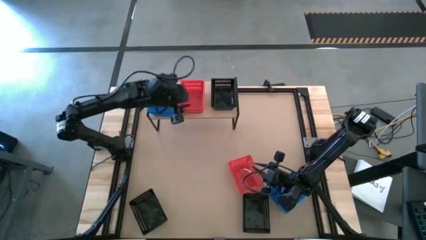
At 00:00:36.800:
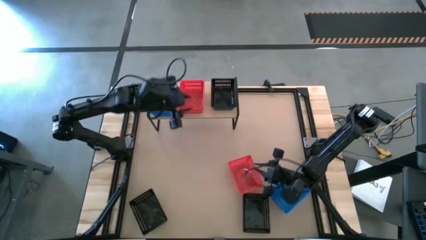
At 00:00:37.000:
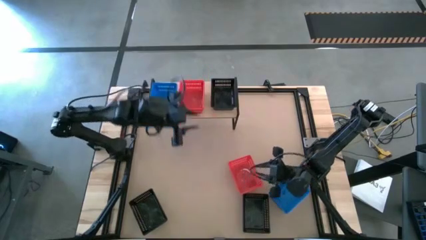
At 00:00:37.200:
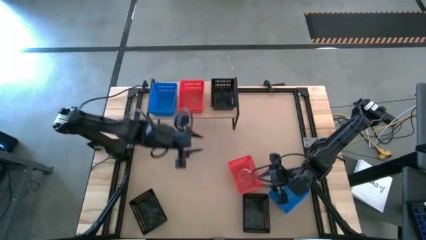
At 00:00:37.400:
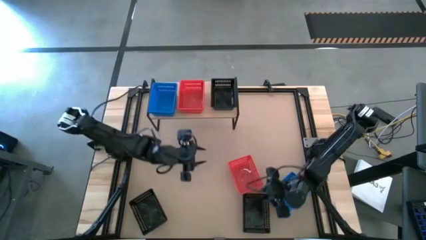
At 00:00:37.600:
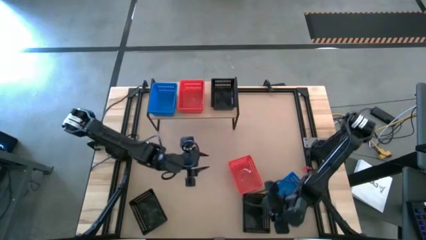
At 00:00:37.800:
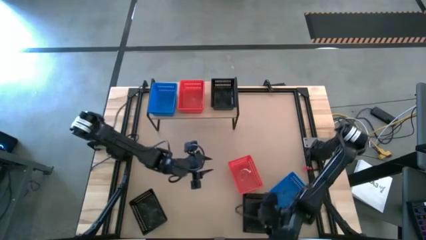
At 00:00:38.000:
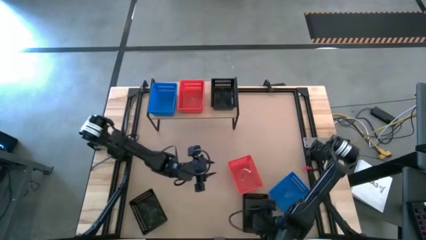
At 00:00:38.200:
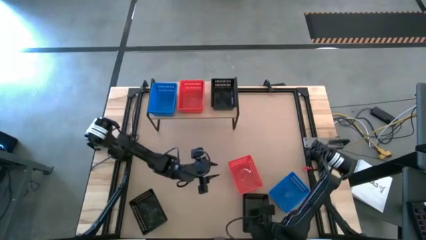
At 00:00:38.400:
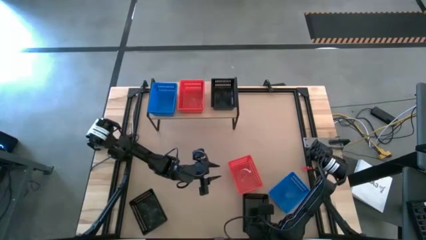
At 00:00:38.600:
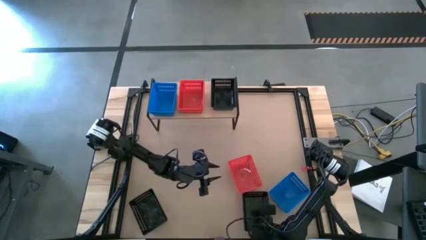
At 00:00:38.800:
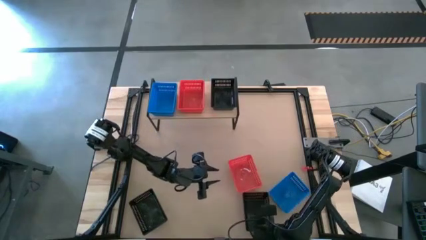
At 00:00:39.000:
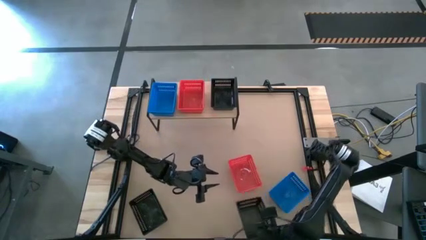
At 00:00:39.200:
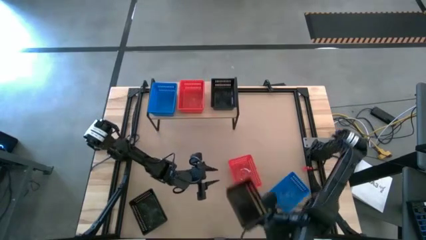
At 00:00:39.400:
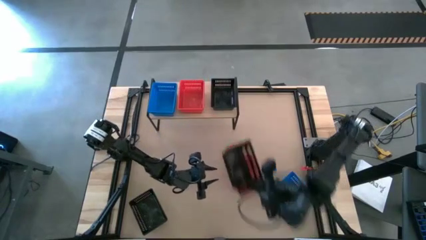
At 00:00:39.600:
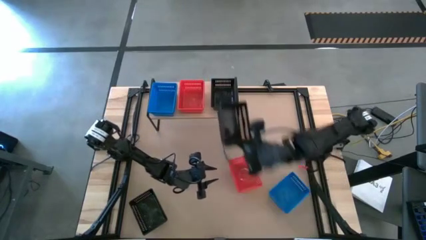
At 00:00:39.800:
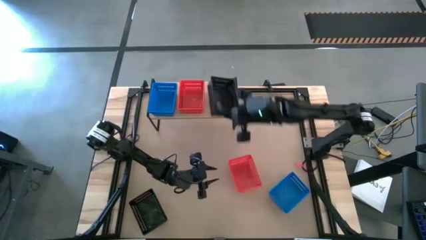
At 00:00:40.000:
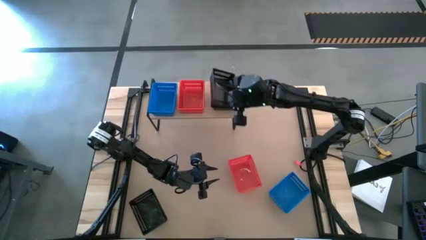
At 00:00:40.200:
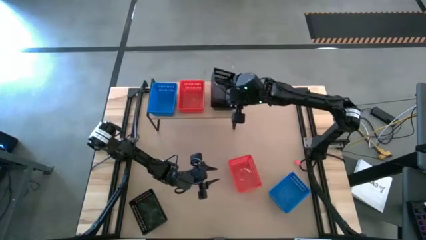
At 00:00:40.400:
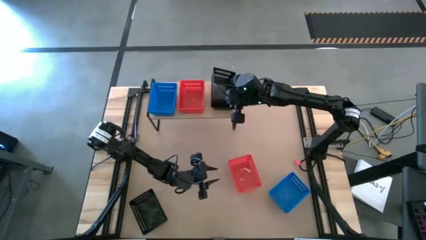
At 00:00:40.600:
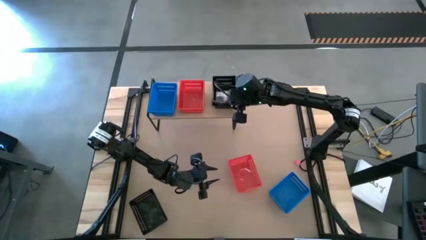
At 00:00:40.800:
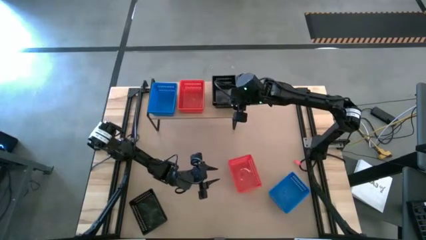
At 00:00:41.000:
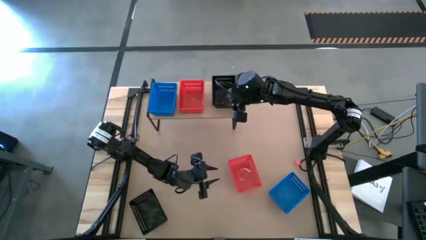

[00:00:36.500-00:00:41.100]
Task: Stack baskets on shelf by color
Stack the right black bin on the black bin on the shelf

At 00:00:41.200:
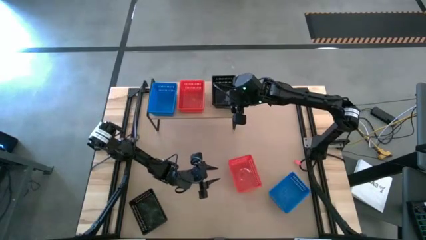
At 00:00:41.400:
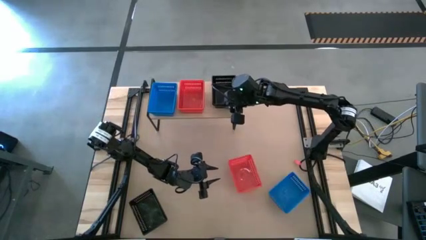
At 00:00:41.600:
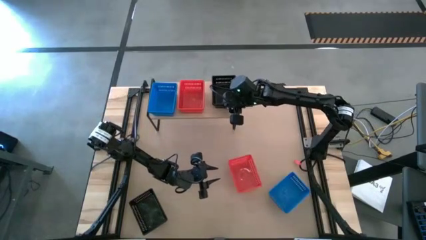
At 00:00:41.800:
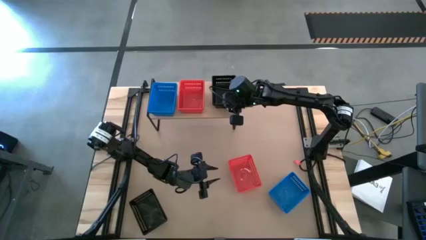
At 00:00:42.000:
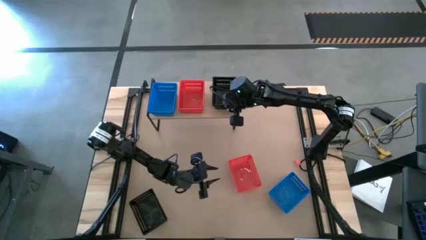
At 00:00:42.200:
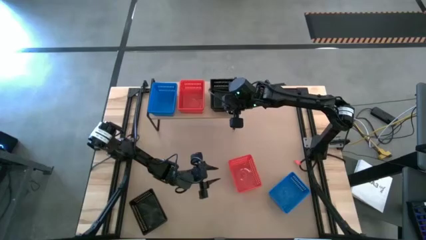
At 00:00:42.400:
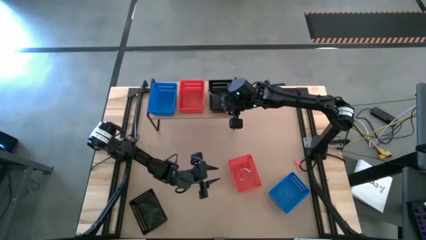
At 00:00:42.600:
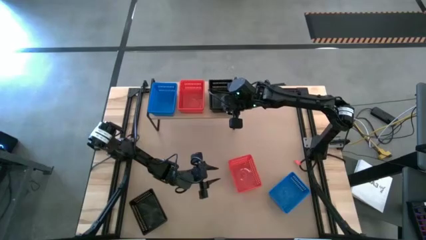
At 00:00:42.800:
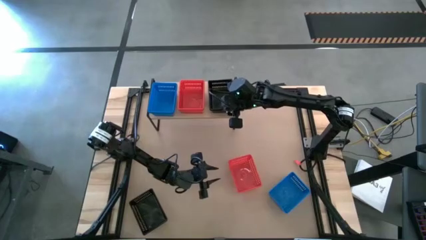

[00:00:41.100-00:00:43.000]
Adjust the black bin on the shelf

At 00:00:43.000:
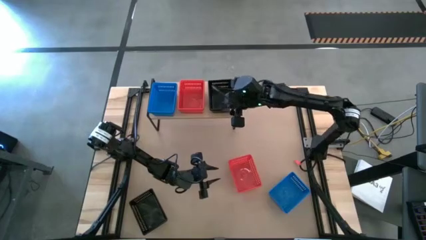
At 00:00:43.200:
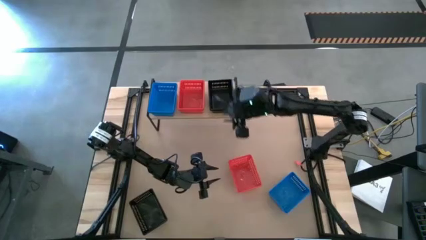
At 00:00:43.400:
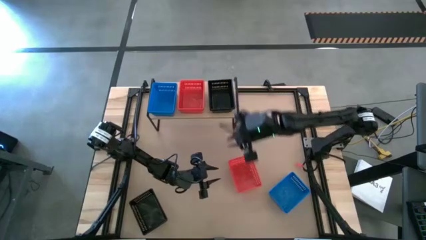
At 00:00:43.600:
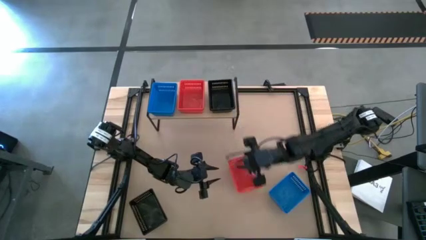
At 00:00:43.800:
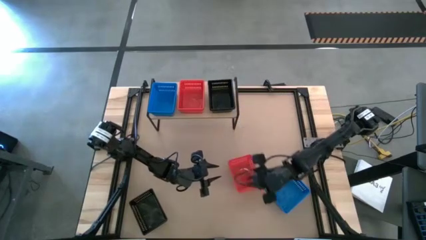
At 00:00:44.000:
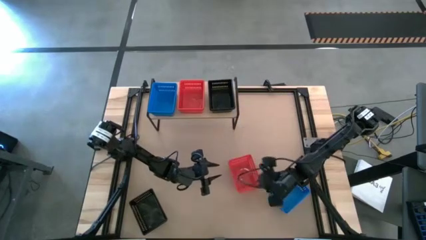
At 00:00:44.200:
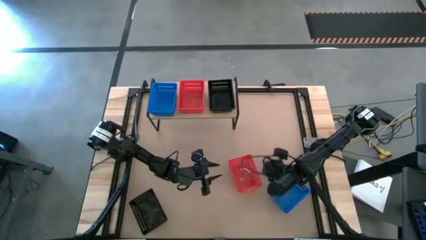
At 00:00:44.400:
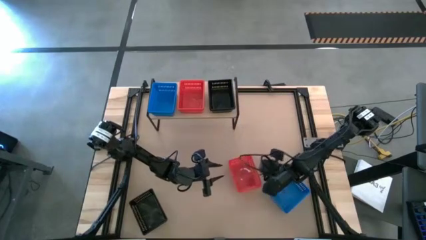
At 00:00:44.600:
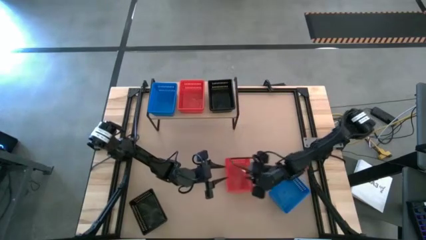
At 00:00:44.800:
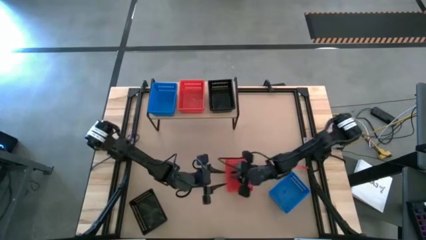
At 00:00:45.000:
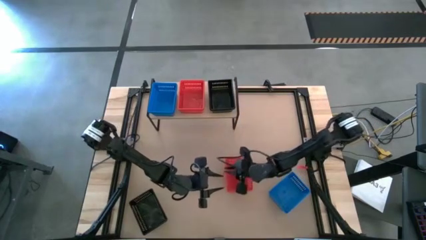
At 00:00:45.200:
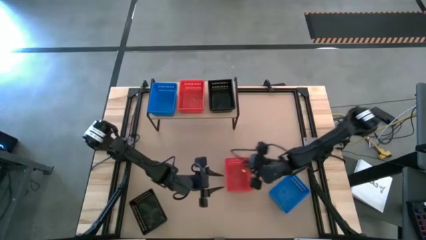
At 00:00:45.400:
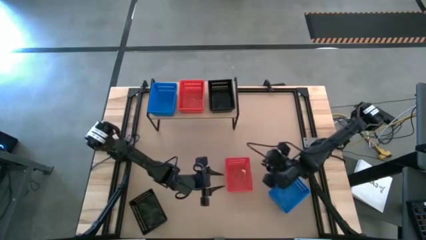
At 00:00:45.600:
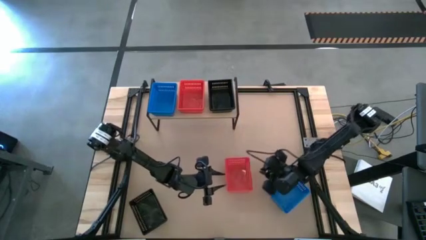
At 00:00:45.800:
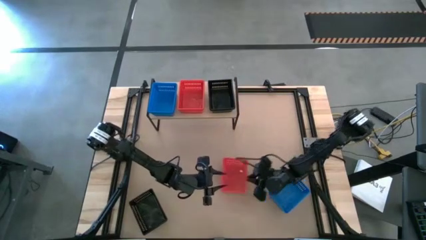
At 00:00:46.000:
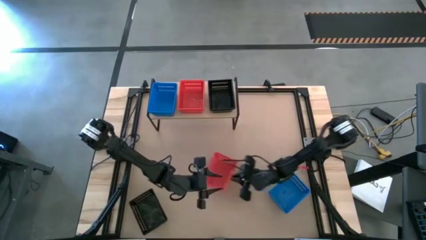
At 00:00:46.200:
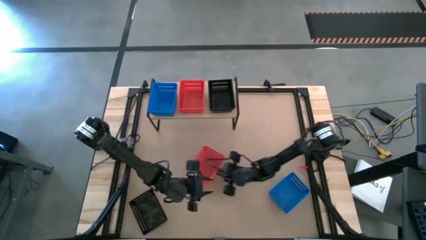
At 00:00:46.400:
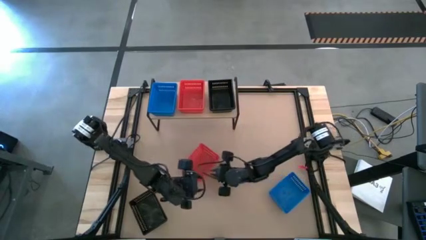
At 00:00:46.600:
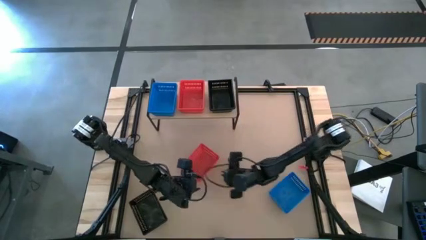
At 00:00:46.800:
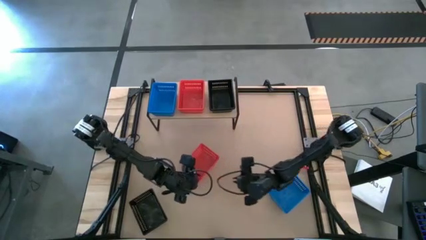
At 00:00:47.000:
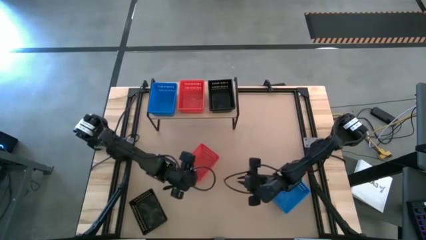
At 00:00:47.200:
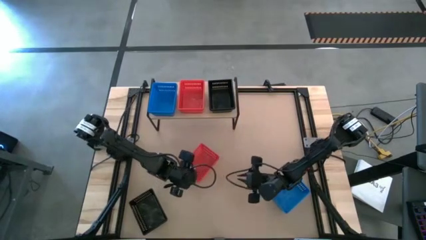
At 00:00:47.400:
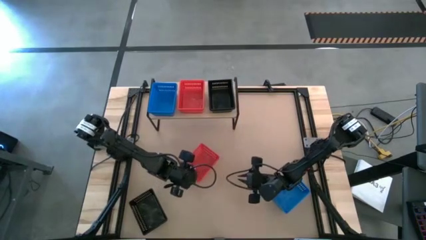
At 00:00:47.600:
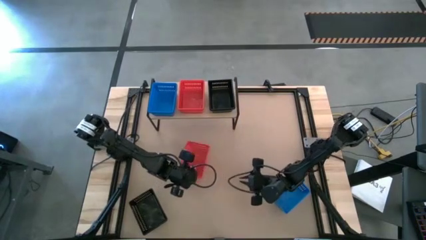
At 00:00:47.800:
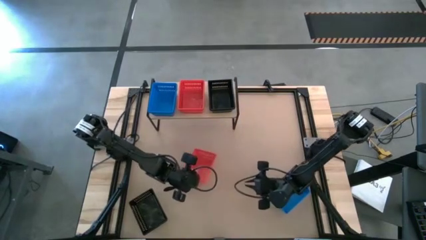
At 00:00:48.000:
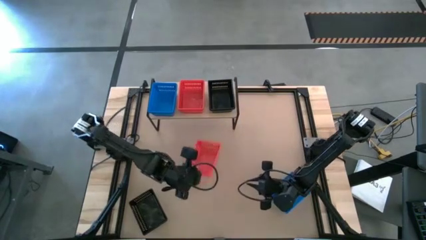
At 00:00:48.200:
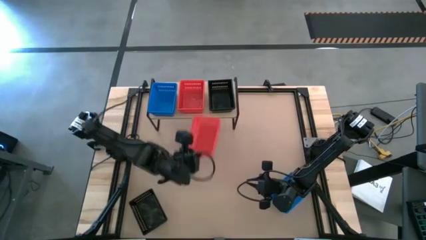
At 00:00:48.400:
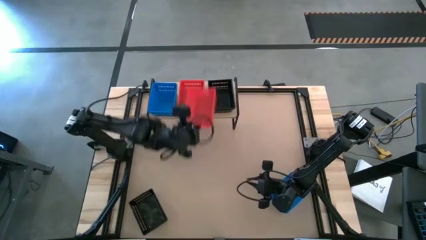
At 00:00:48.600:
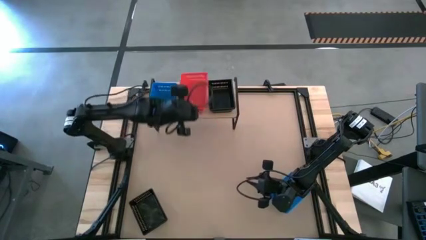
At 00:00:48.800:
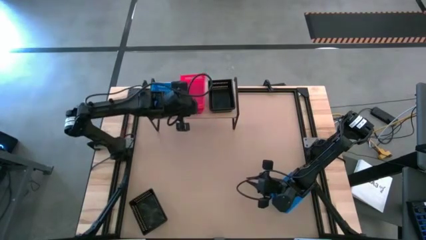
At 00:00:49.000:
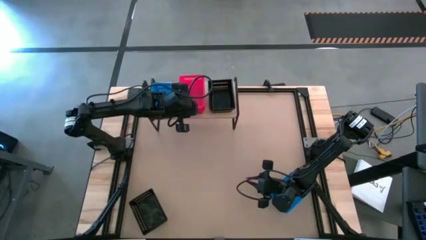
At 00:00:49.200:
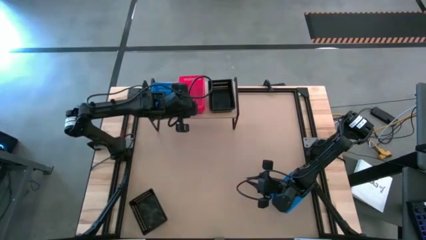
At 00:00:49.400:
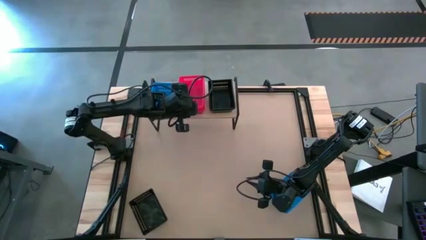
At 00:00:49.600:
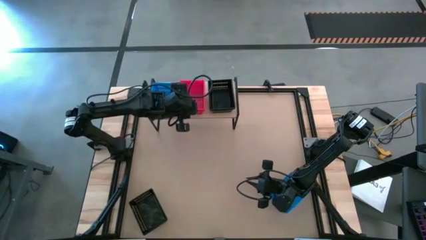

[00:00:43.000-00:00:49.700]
Stack the red bin on the red bin on the shelf
